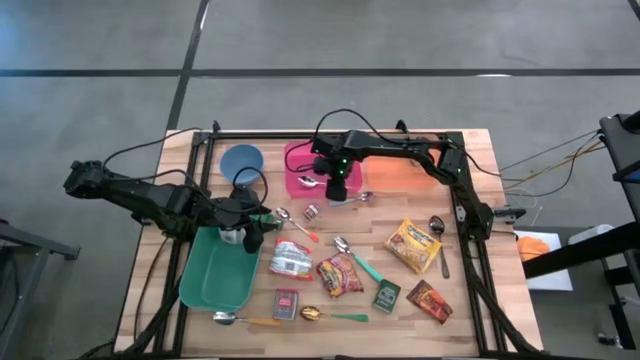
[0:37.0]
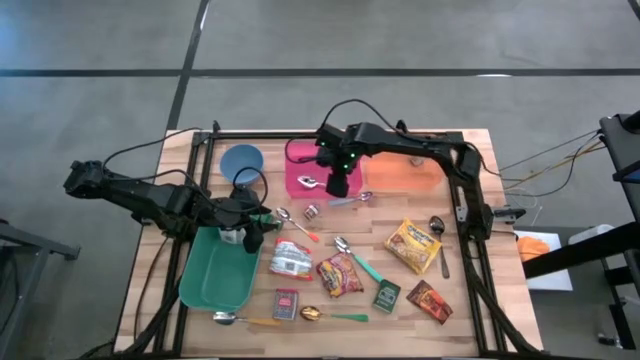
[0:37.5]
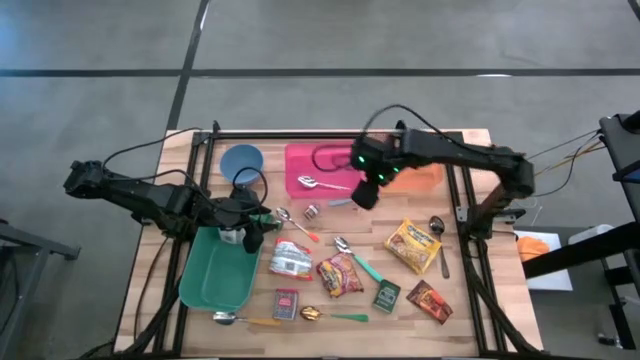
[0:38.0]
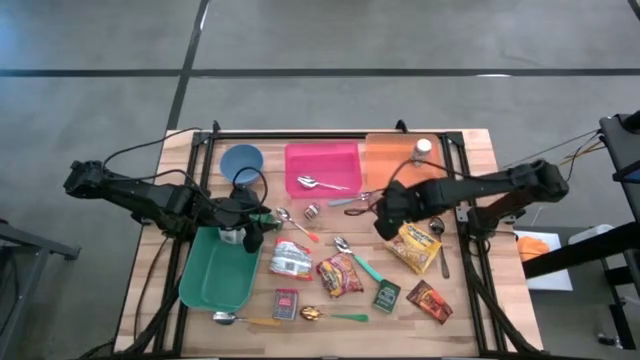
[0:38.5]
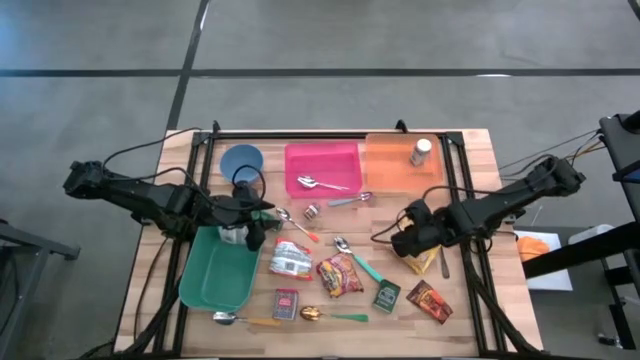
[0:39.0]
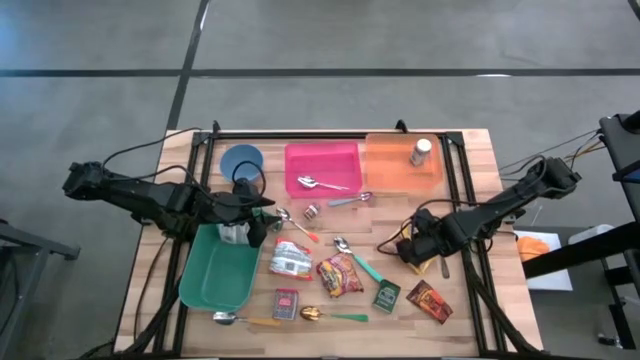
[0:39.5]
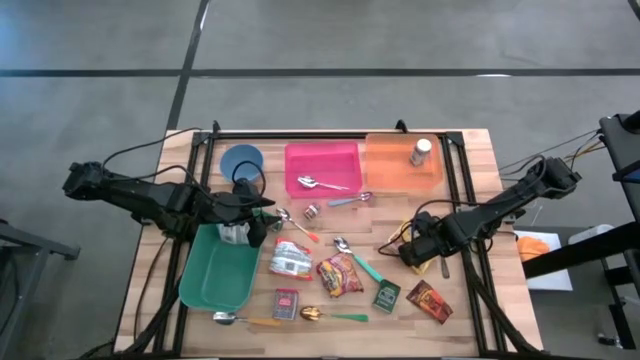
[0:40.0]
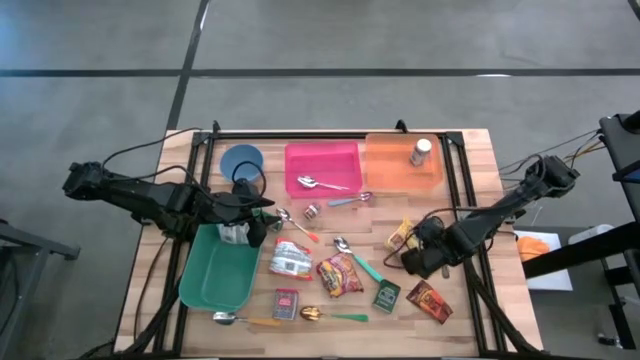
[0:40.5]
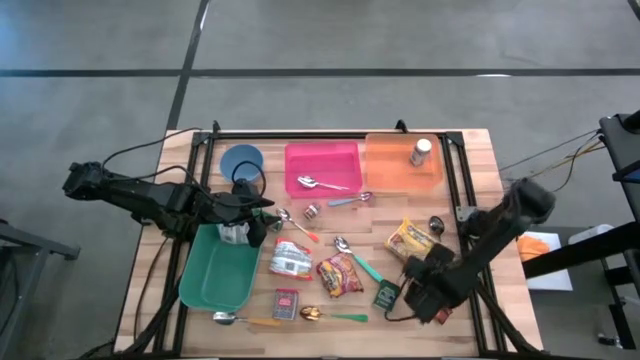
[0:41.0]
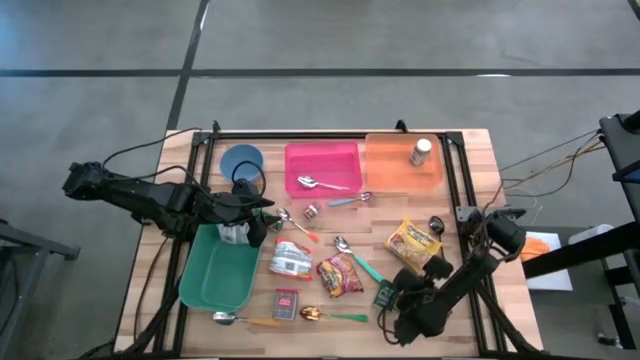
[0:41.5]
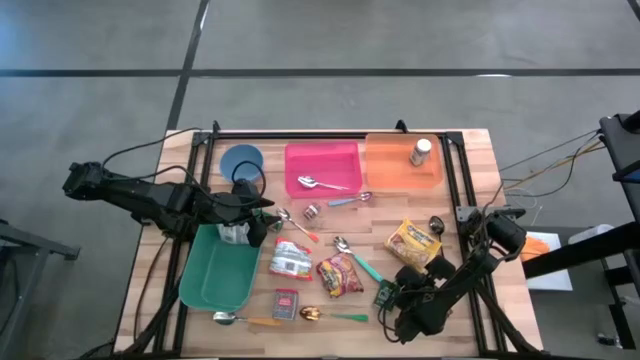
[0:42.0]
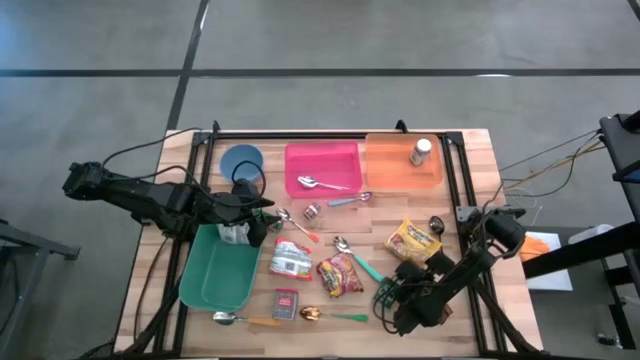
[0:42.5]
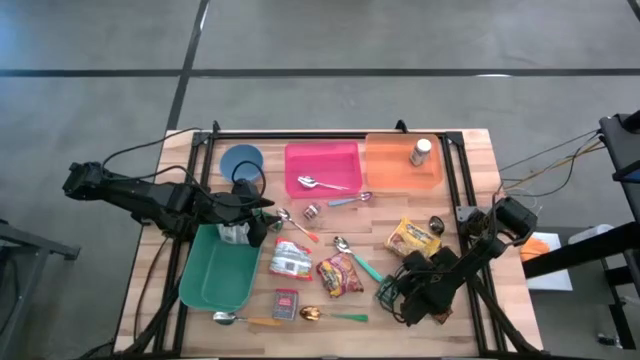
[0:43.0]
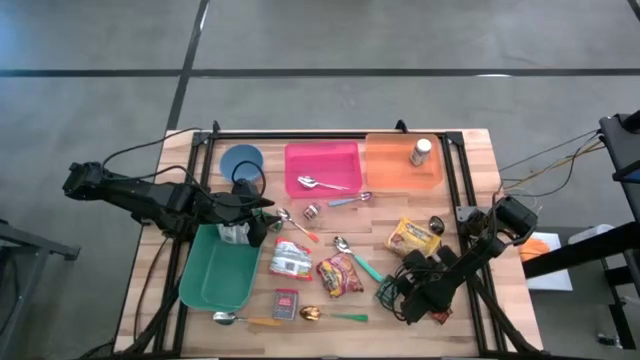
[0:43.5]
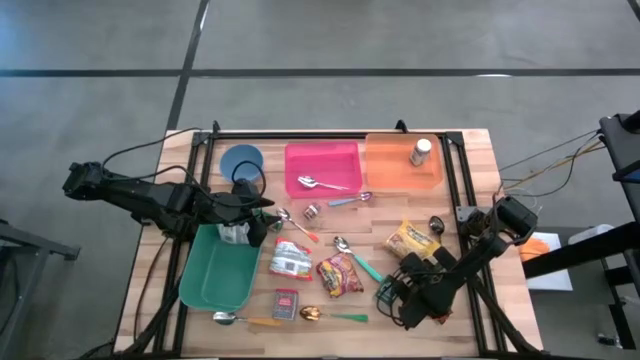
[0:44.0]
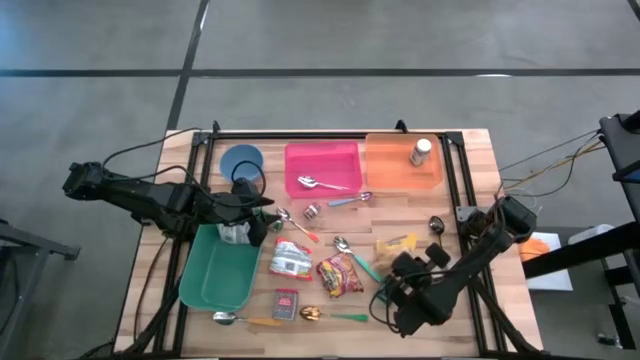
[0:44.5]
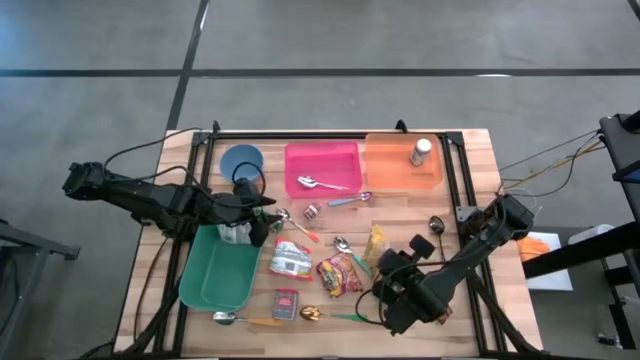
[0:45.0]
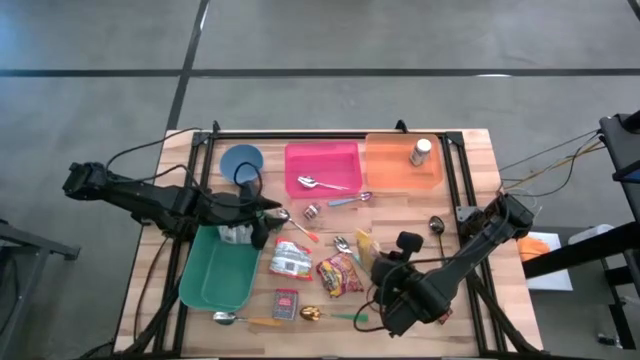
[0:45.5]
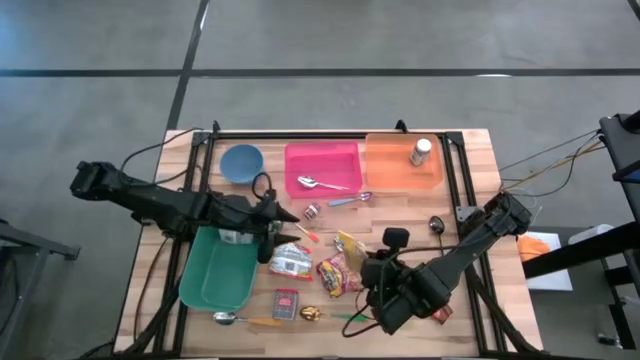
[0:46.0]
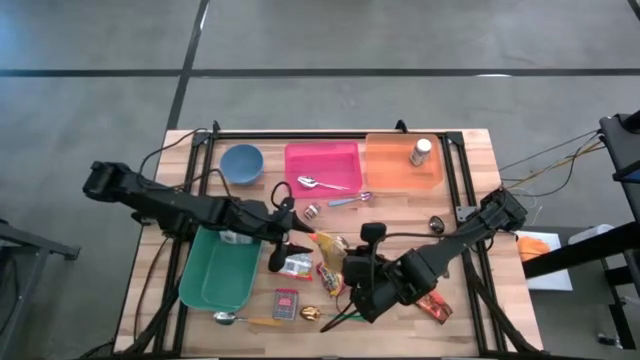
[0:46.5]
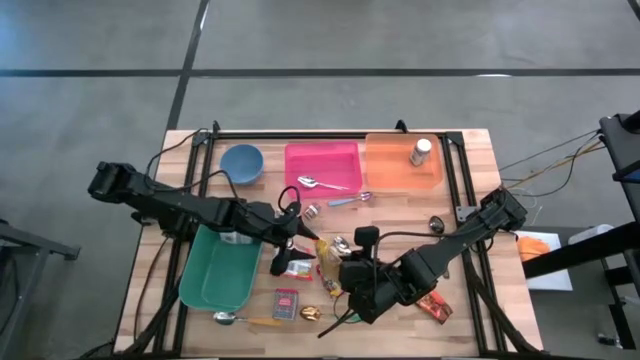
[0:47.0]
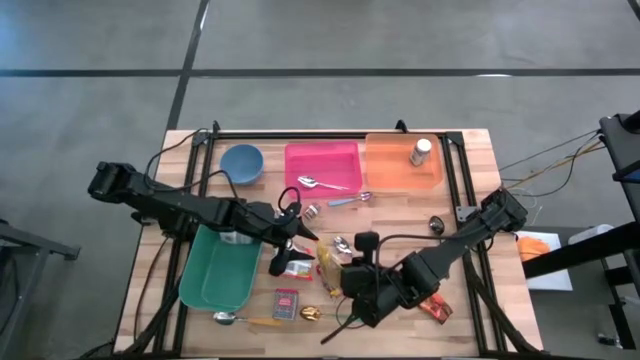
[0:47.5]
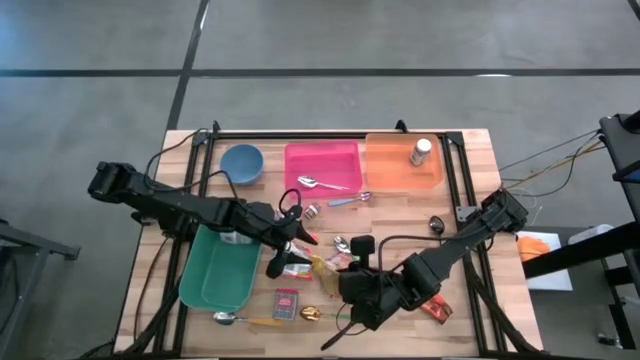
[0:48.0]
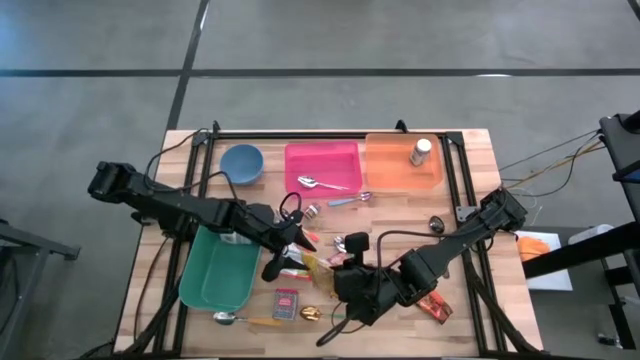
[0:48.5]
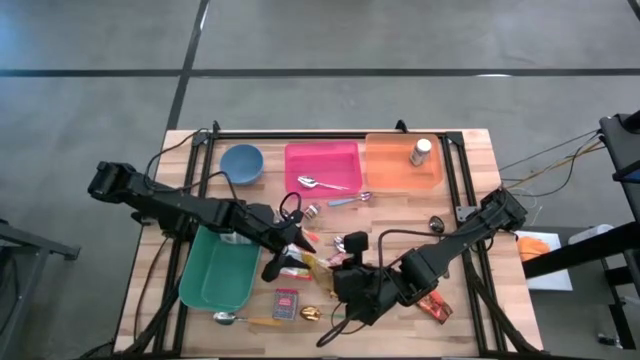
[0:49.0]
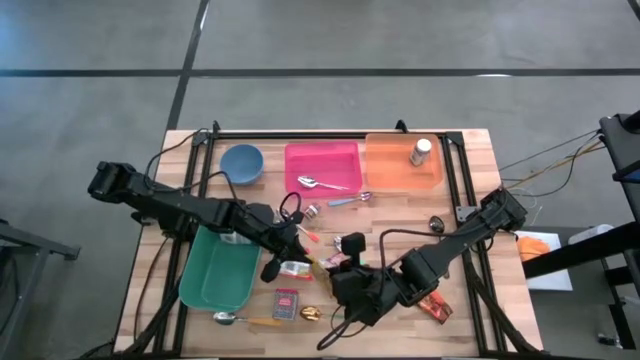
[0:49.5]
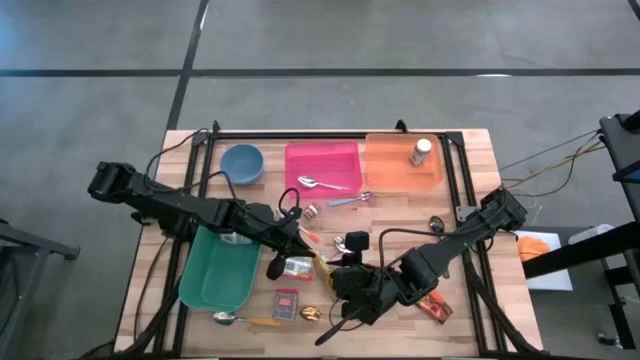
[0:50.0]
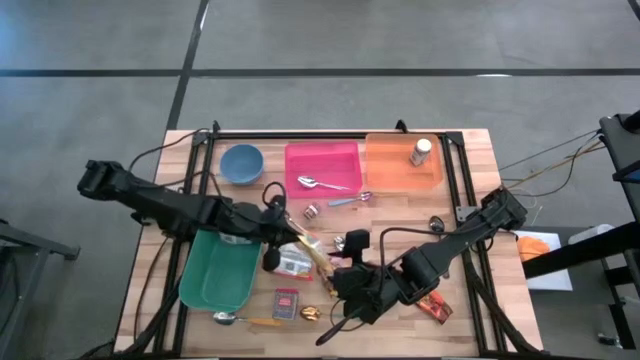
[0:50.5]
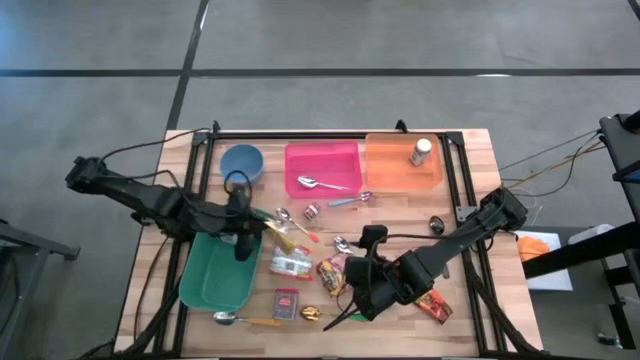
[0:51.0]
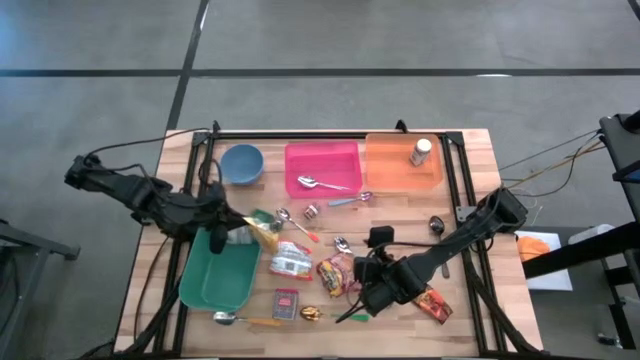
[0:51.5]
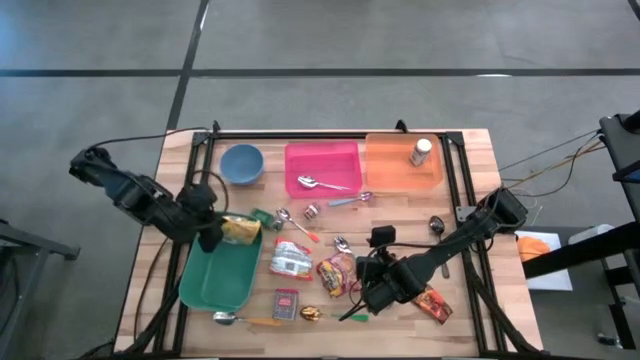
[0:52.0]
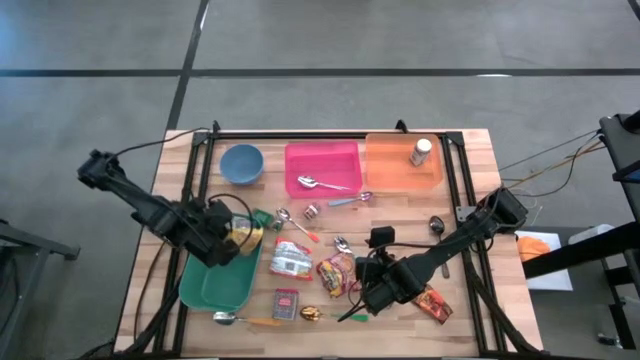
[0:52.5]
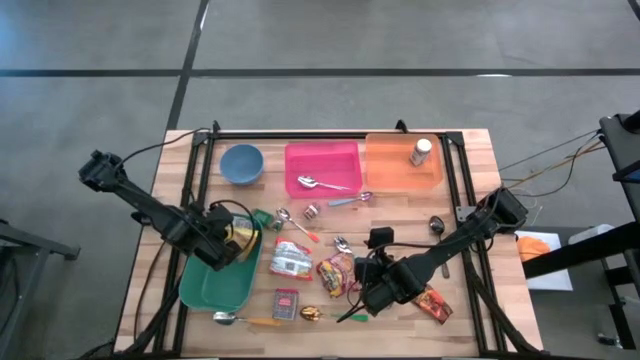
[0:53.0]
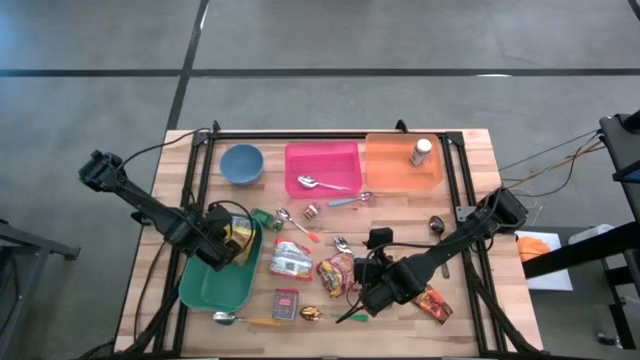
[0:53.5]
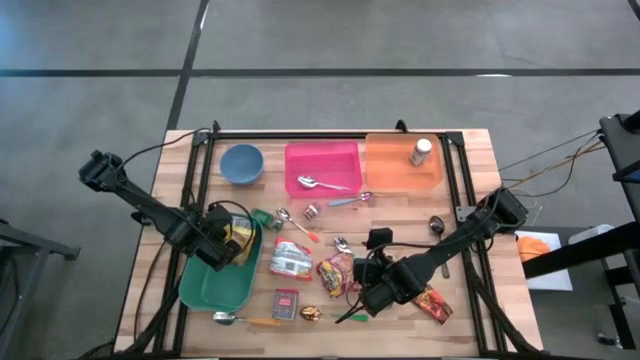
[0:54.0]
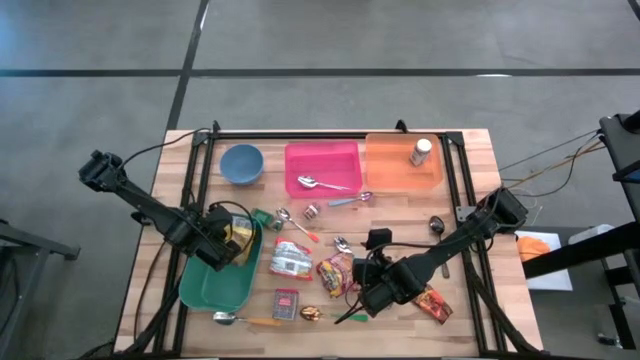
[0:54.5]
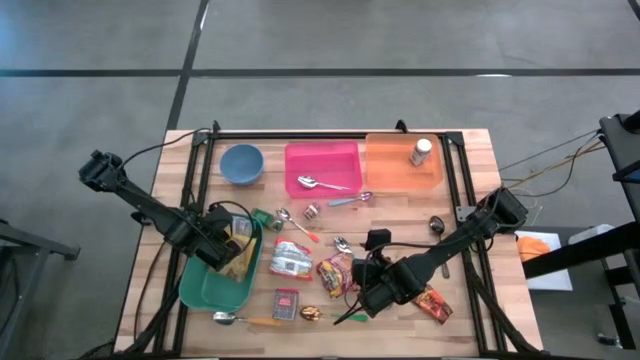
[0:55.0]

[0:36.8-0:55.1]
Put the yellow noodle pack into the green bin
